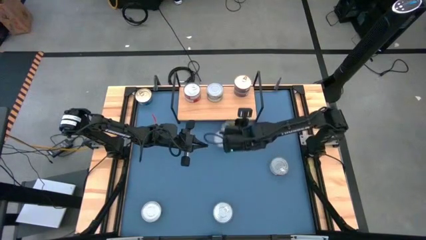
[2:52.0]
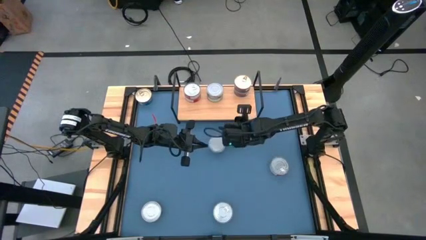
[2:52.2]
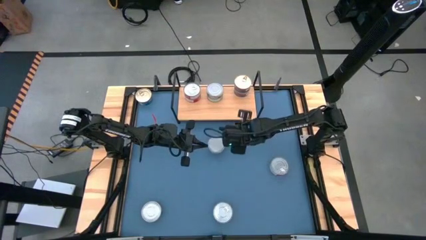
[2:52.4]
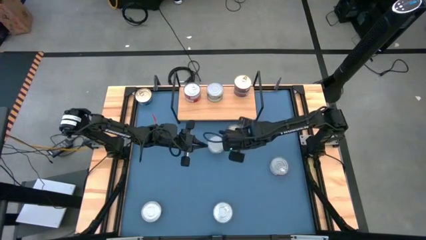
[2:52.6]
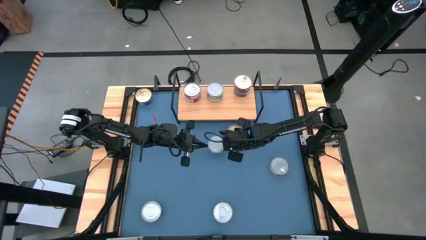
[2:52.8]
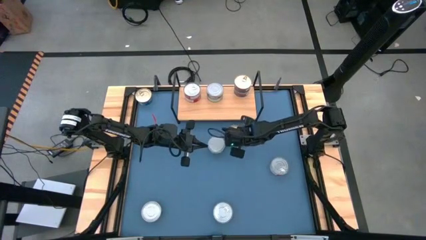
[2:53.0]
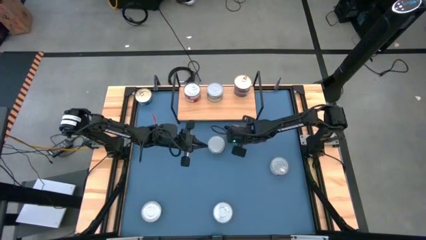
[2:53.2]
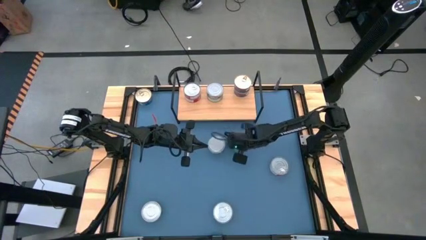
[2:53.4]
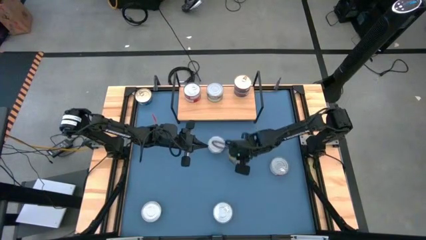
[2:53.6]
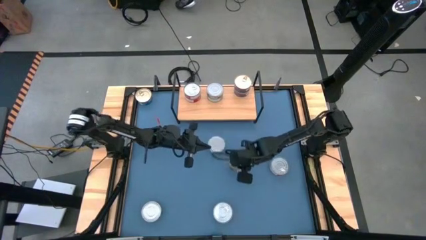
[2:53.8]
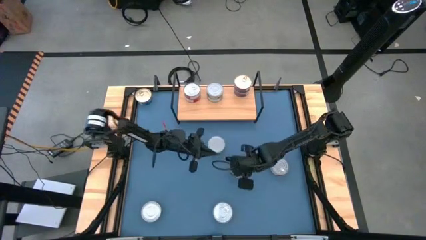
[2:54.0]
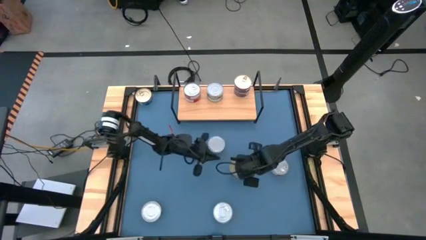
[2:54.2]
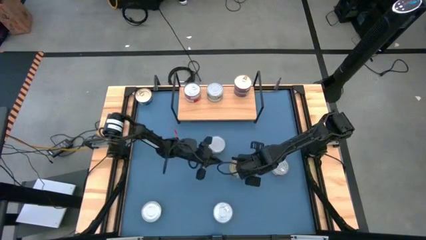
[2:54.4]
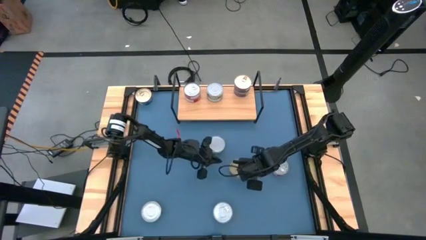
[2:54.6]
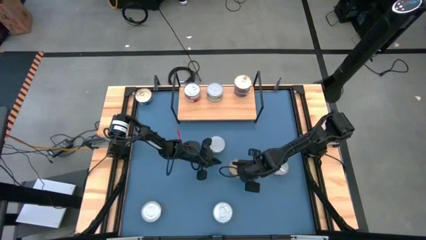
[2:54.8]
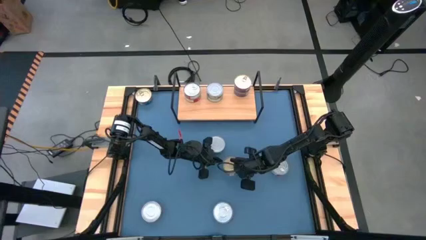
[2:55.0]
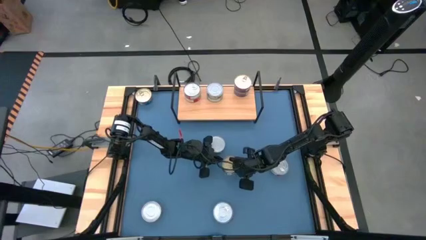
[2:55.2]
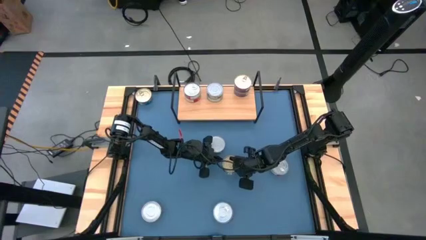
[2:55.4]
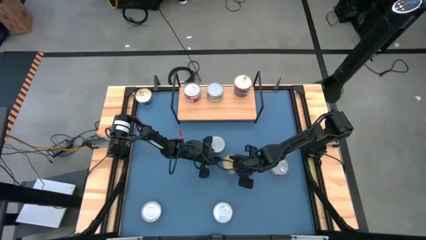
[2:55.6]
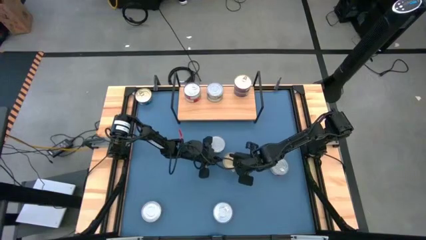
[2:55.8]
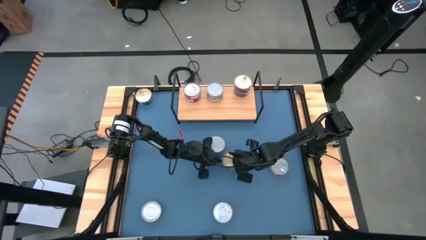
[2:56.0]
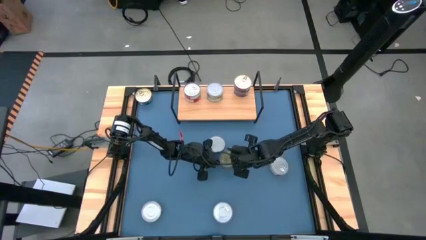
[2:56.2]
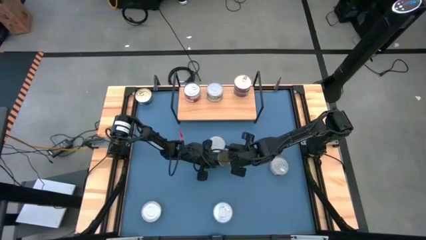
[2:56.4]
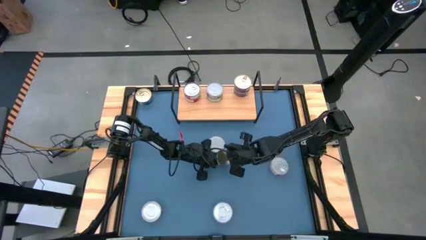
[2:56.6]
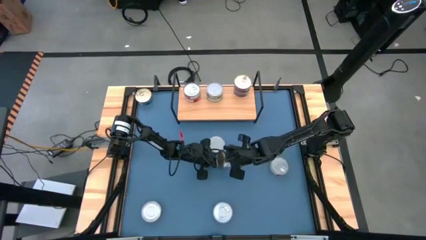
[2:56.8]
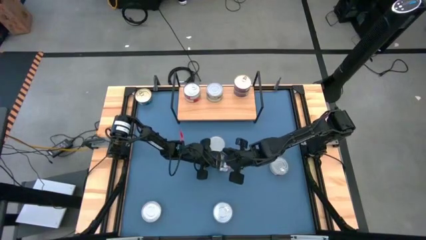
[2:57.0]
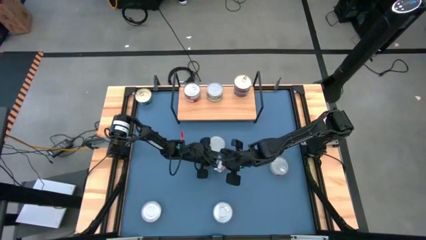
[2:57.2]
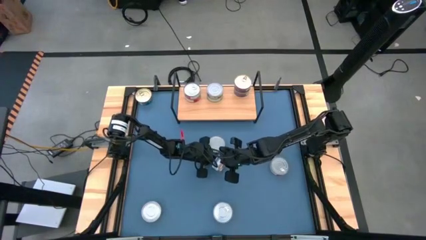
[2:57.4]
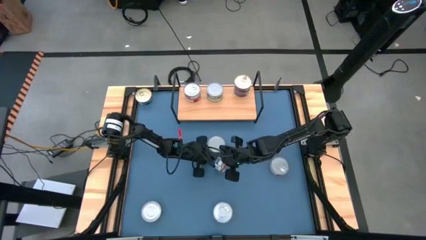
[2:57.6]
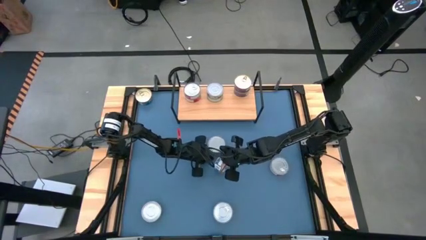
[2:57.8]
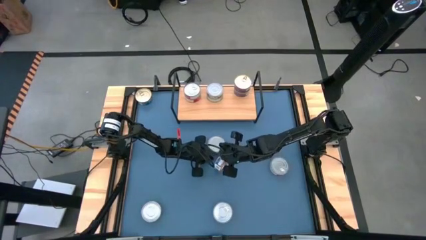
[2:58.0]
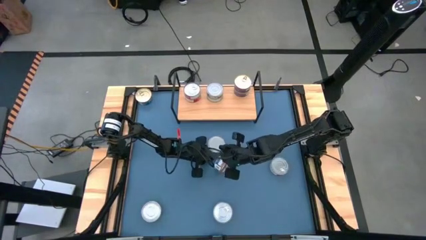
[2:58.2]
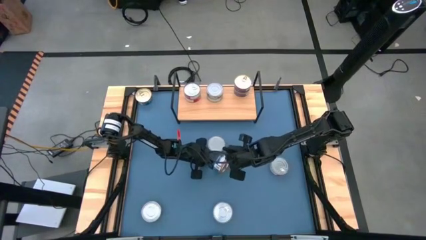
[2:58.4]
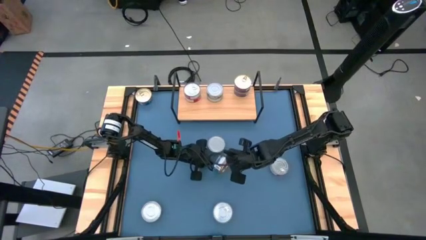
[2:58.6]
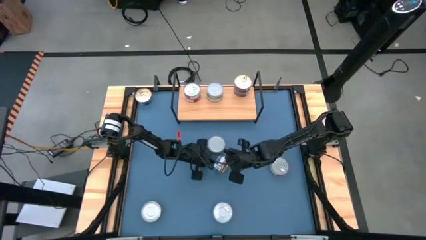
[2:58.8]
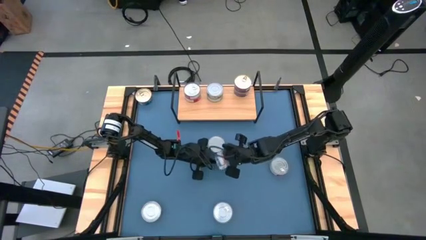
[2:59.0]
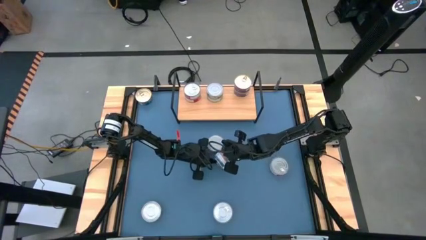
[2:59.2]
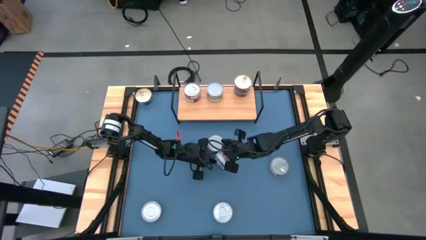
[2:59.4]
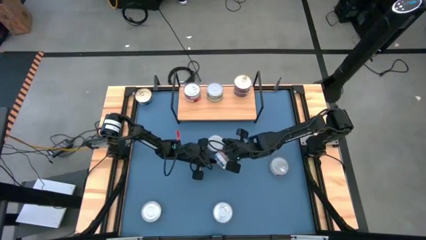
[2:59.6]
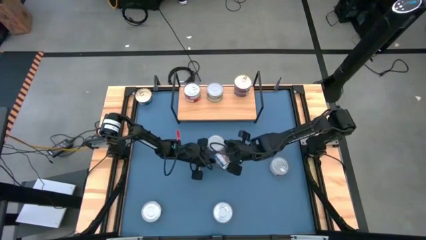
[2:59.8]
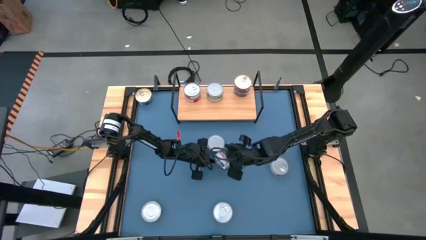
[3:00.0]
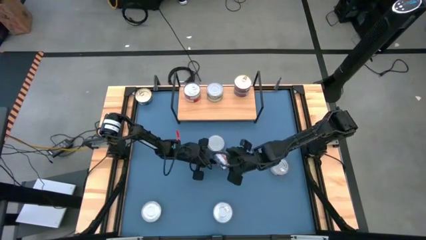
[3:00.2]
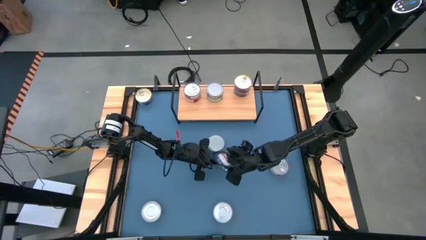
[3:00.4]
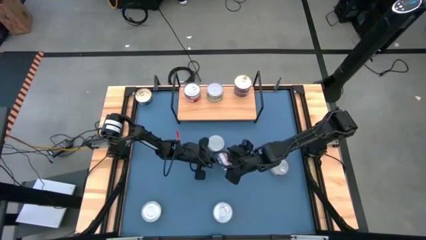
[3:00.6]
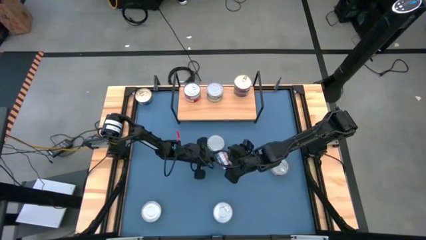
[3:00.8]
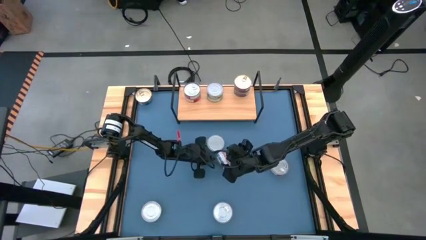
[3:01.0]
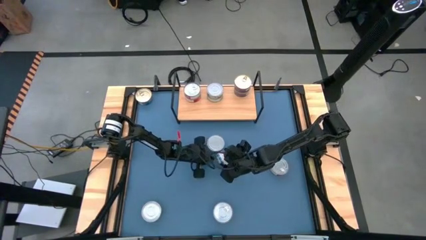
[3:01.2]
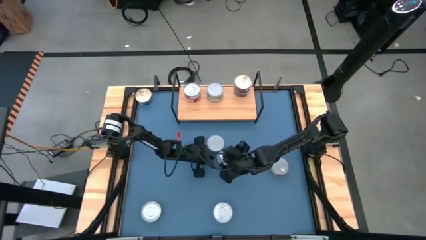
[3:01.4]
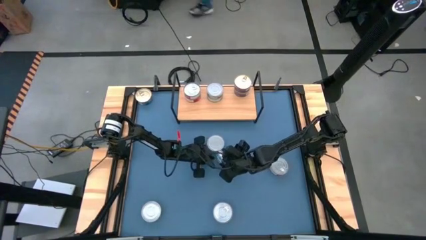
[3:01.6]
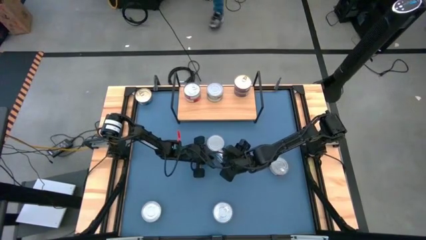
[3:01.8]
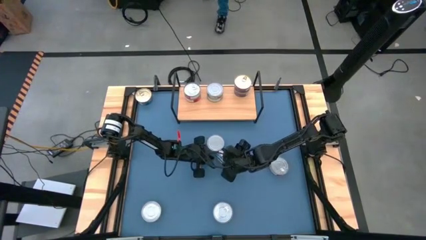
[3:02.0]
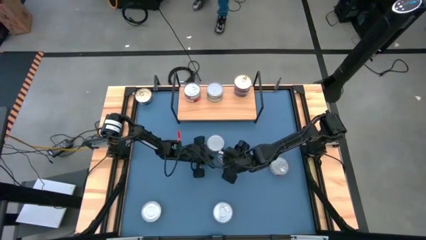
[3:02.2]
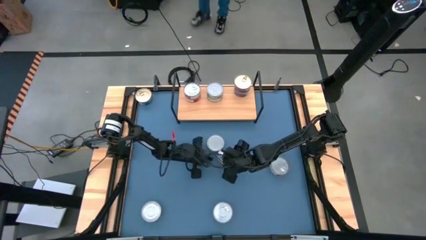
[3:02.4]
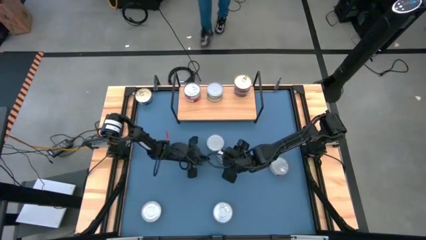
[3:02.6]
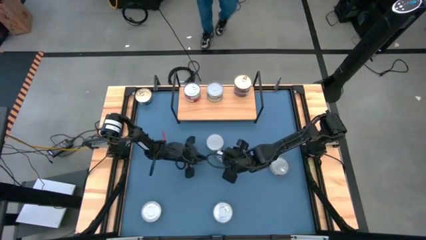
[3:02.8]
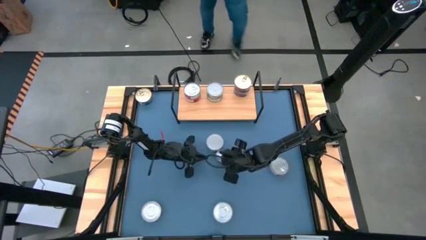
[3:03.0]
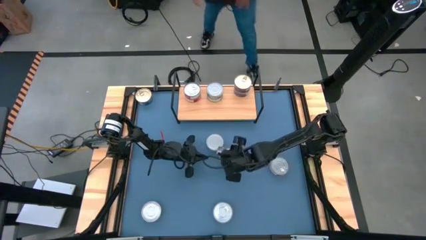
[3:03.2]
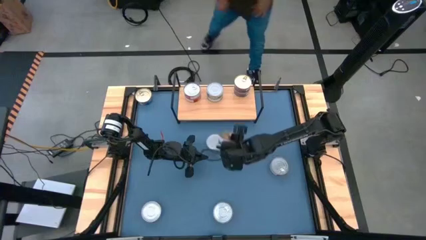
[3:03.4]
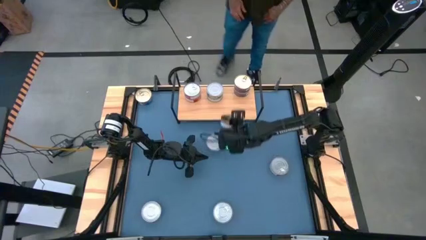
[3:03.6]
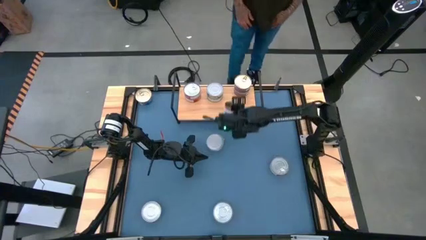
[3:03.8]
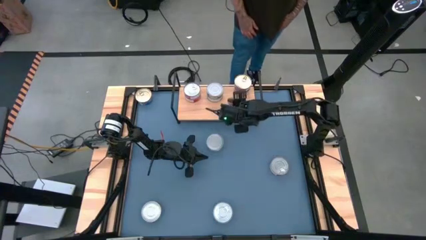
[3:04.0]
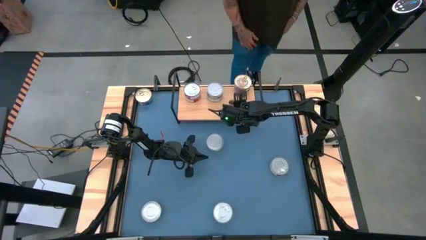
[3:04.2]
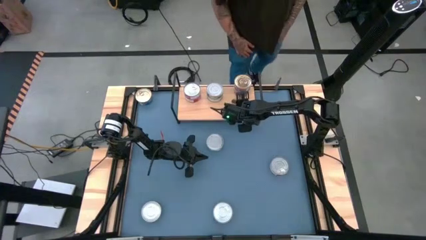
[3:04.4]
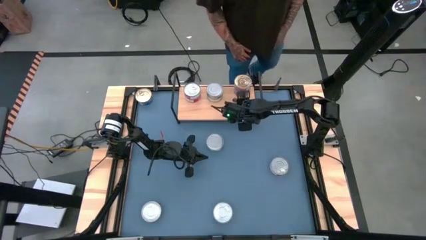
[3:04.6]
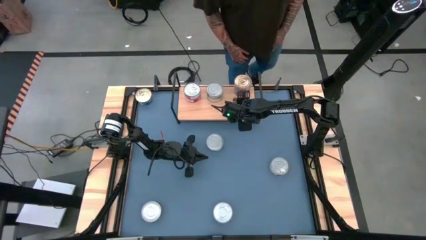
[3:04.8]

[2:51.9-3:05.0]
Task: Stack canned seafood by type on shelf
Put the blue tuna can on the shelf aligned with the stacked blue tuna cans

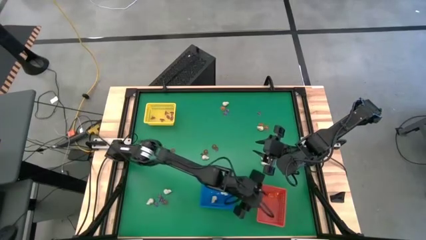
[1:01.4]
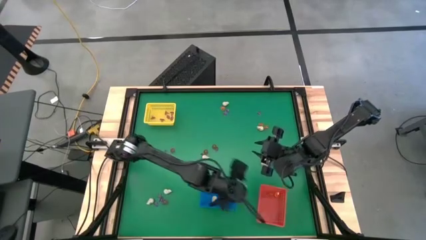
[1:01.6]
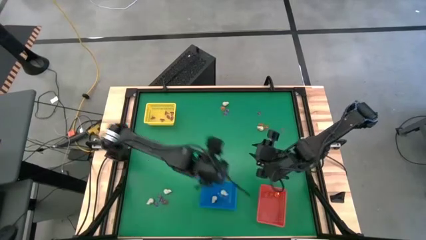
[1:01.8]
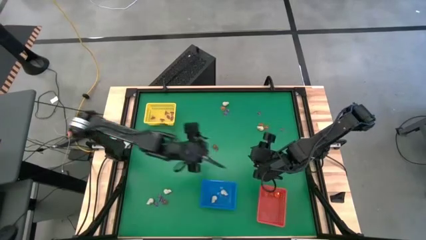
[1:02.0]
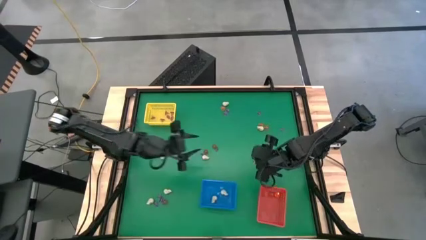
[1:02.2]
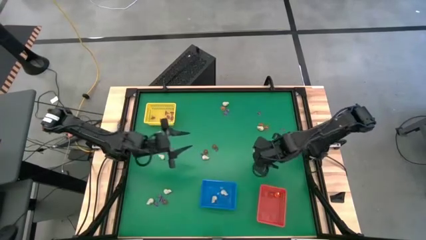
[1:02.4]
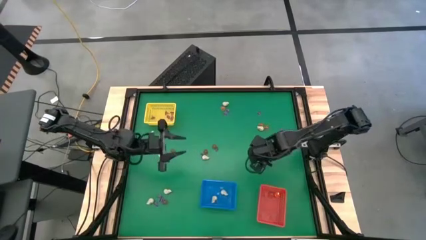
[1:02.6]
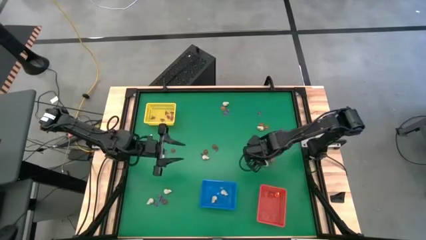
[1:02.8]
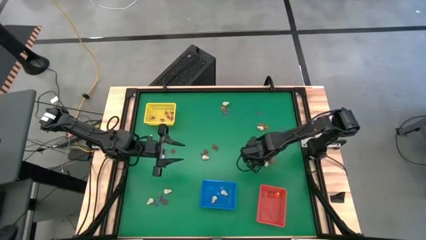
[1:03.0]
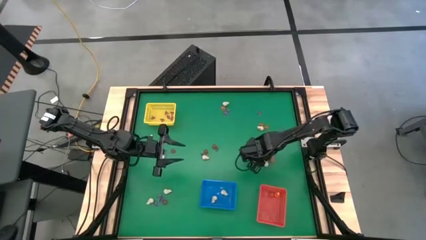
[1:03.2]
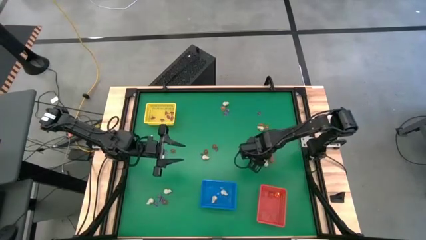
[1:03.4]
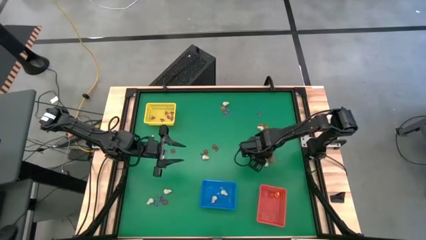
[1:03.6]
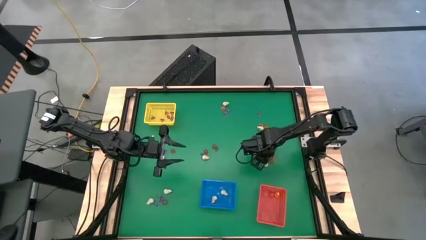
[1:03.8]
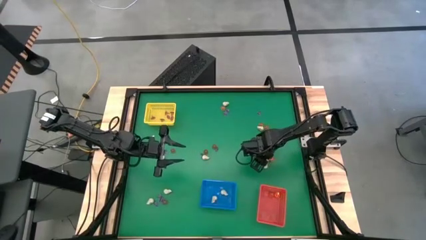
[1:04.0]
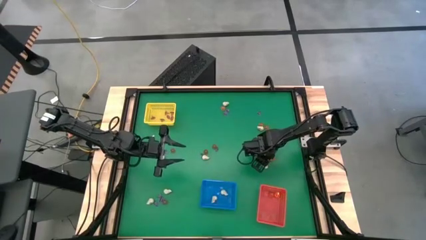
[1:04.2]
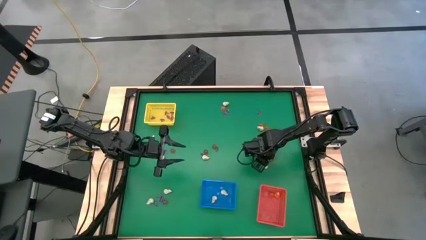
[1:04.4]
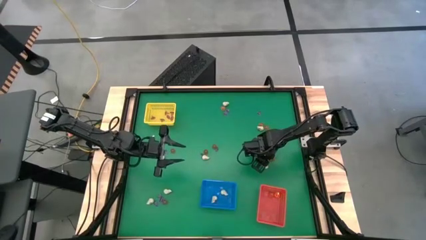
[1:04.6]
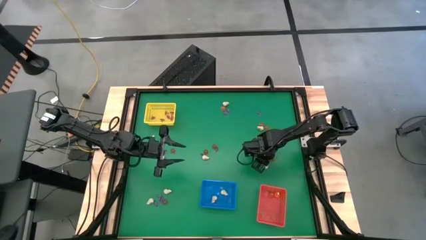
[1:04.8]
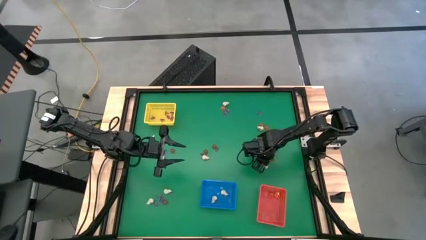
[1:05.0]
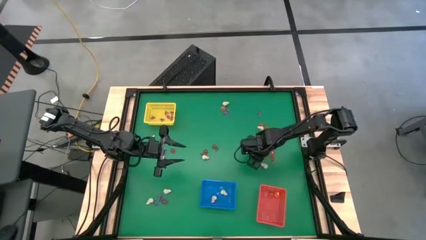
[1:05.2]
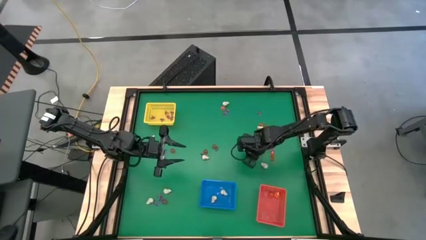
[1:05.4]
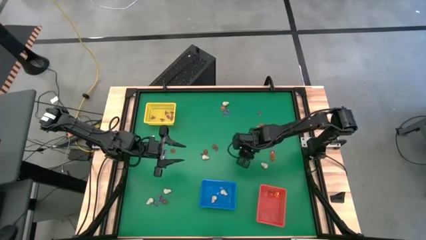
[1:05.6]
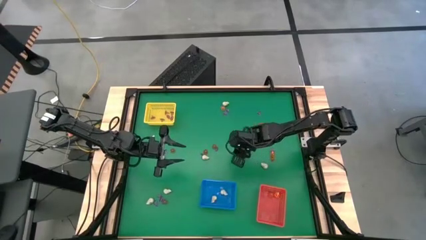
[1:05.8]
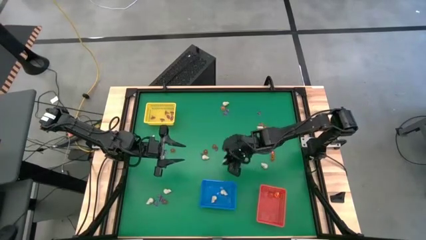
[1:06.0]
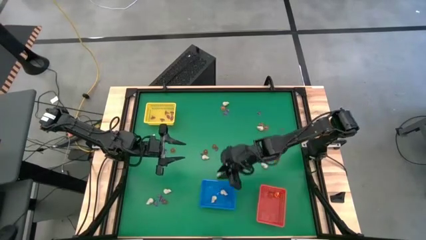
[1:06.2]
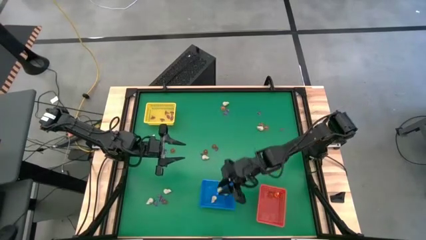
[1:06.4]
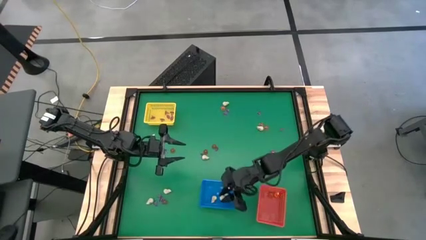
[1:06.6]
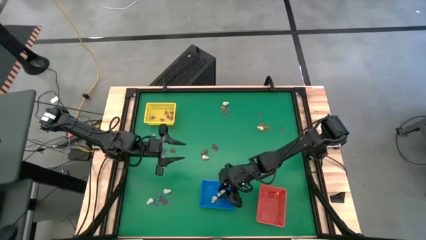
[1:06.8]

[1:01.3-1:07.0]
Task: Sort Halloween decoration
Put the white skull toy into the blue basket
